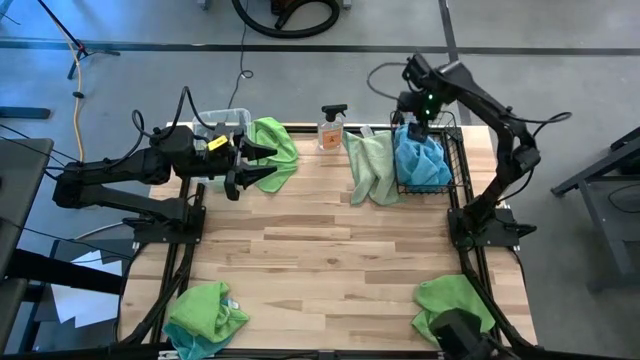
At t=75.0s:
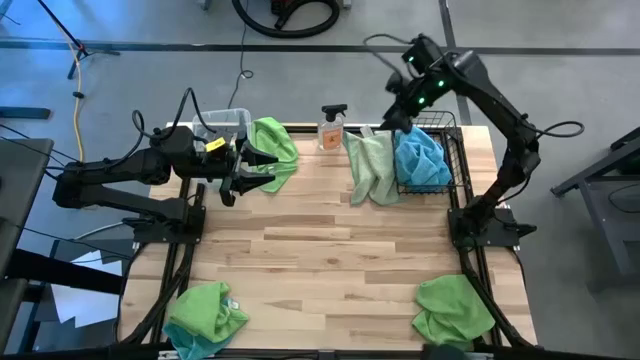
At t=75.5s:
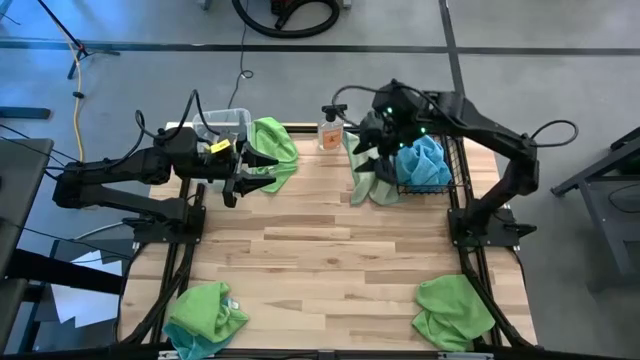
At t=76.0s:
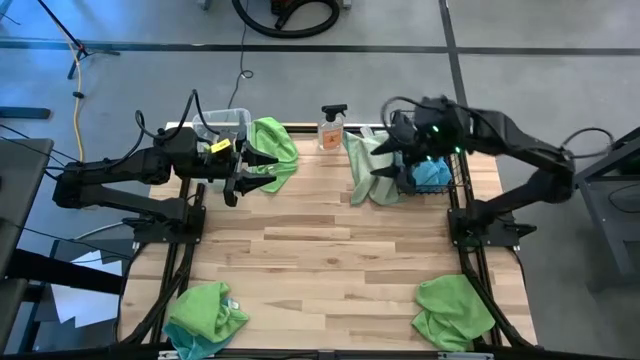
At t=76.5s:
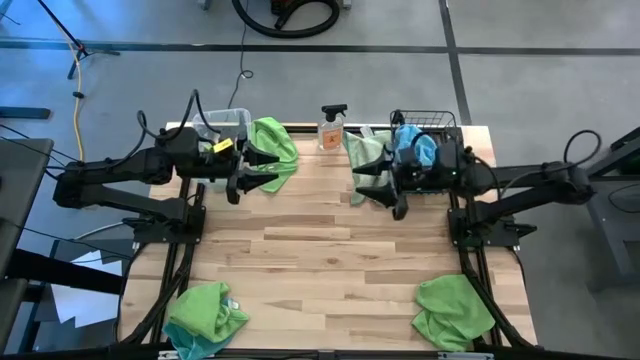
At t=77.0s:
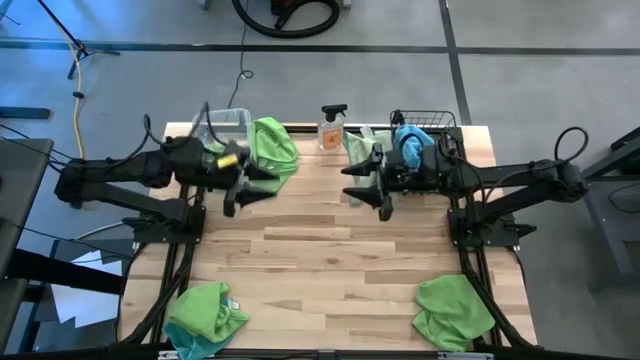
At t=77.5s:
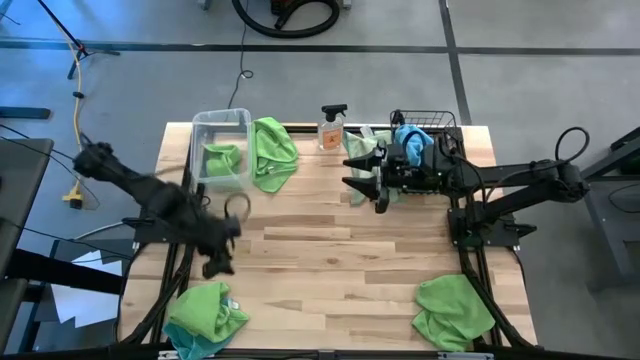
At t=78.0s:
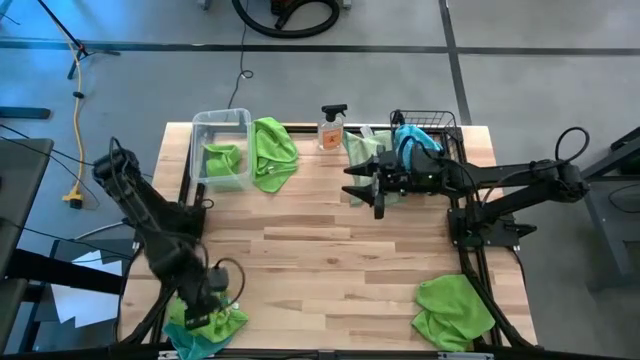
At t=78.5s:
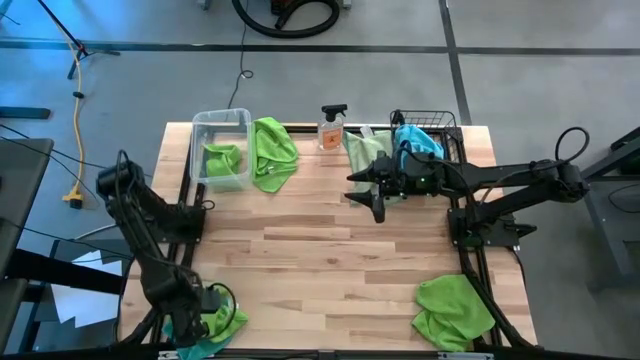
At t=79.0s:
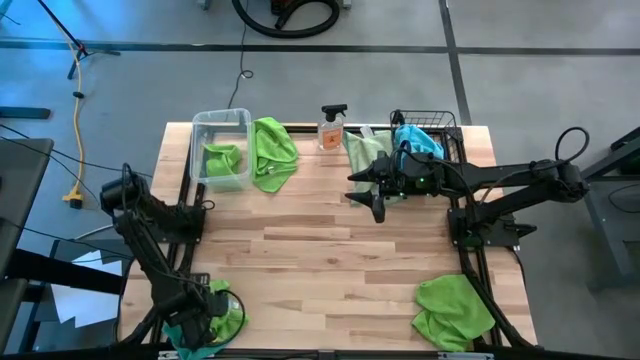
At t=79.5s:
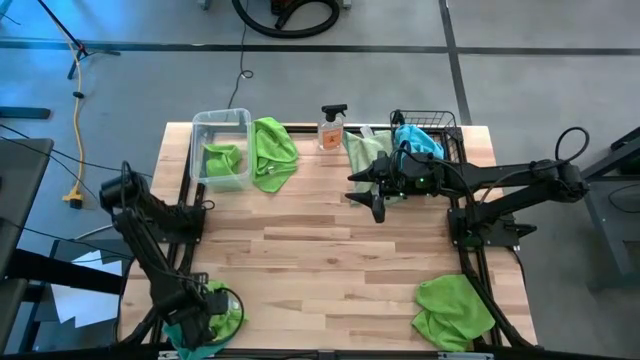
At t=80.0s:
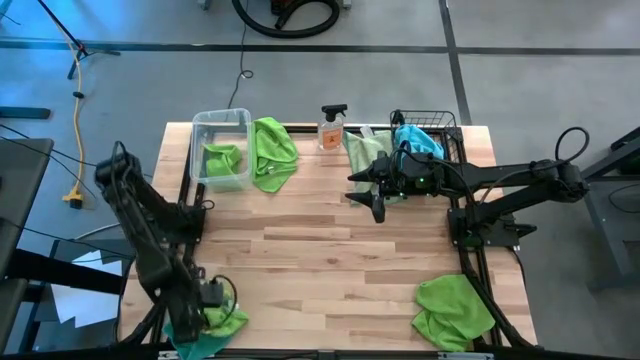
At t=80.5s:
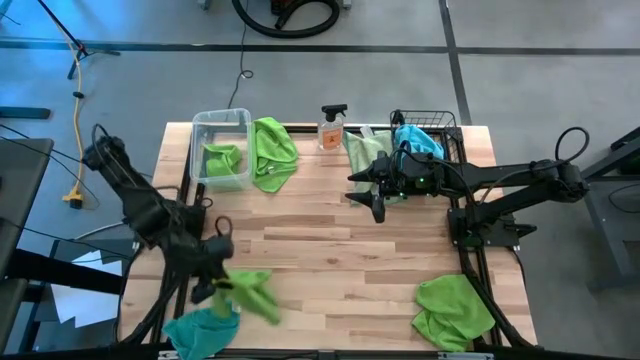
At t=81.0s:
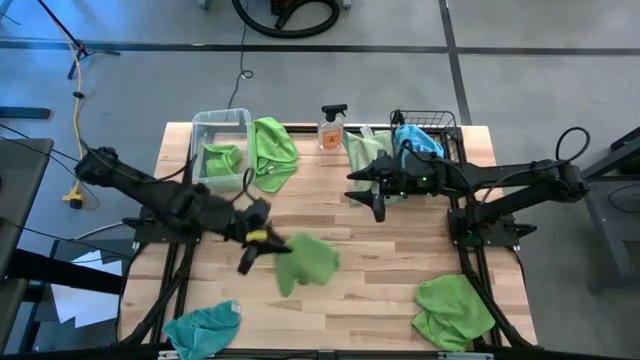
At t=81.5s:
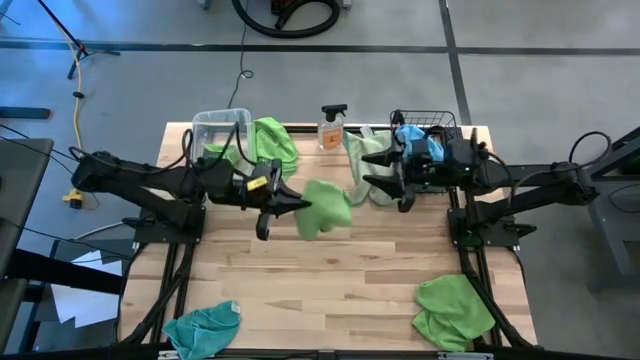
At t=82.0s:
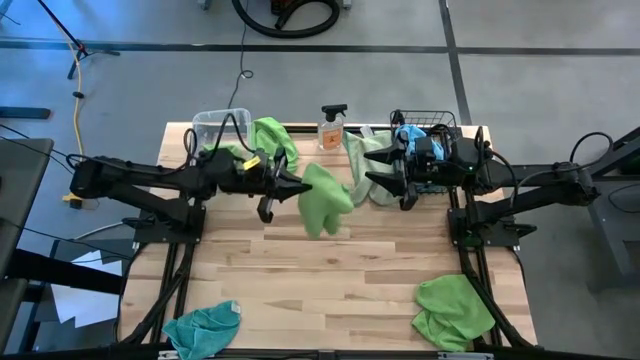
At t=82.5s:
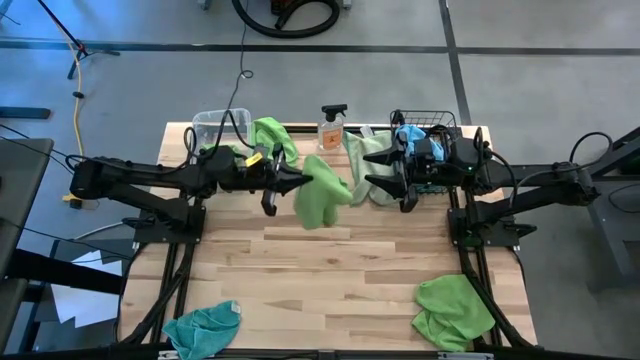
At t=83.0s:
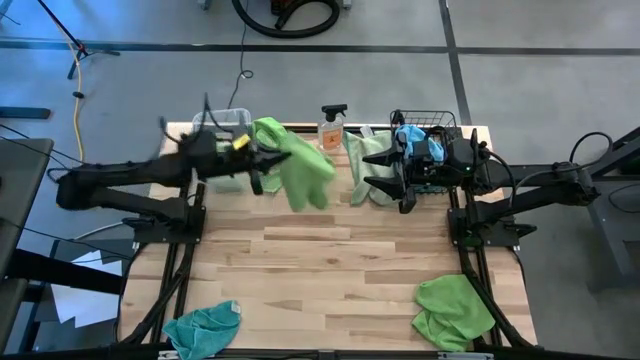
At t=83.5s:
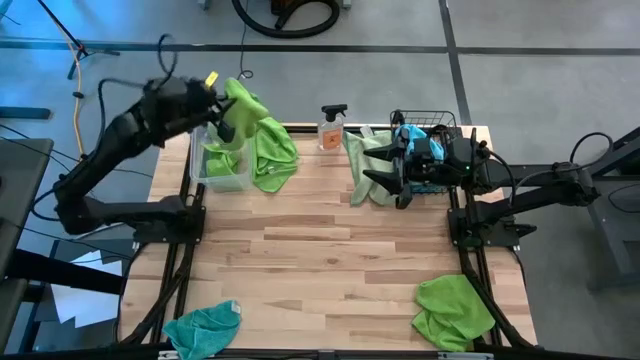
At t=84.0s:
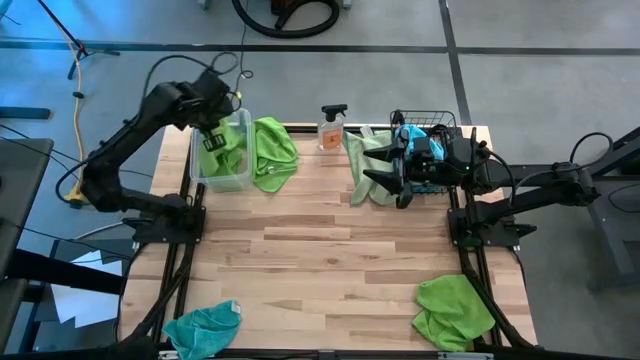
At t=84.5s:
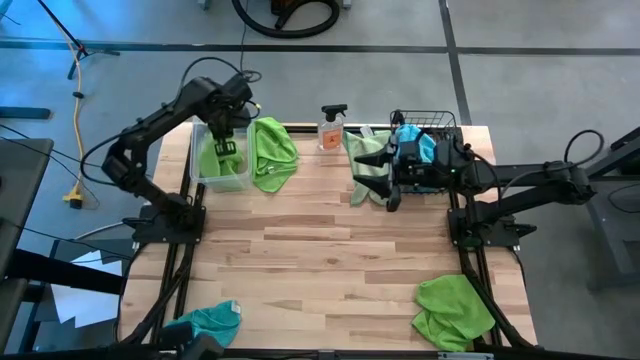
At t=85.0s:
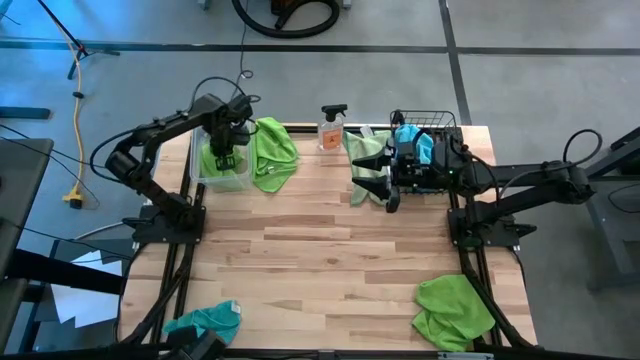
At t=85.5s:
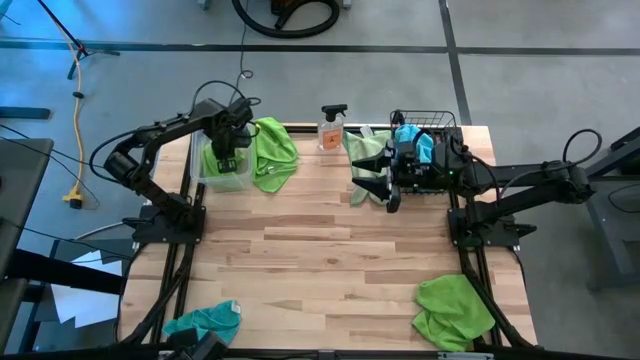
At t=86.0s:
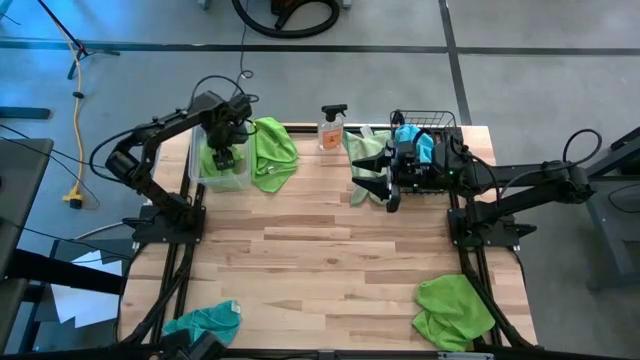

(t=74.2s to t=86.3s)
Task: Sort microfiber towel by color & place in baskets
Put the green microfiber cloth into the bin

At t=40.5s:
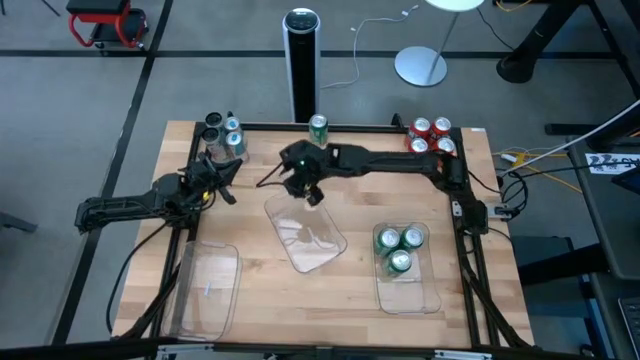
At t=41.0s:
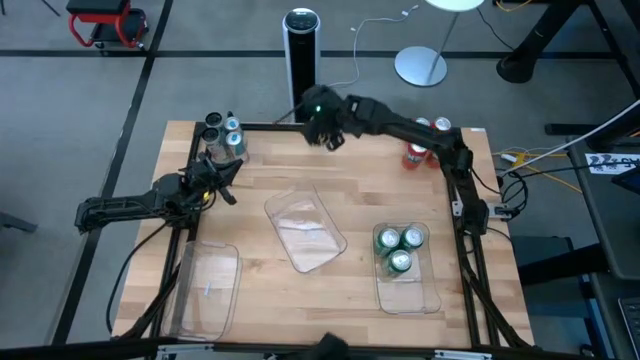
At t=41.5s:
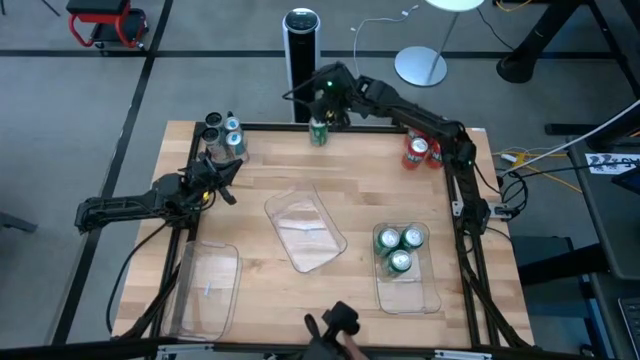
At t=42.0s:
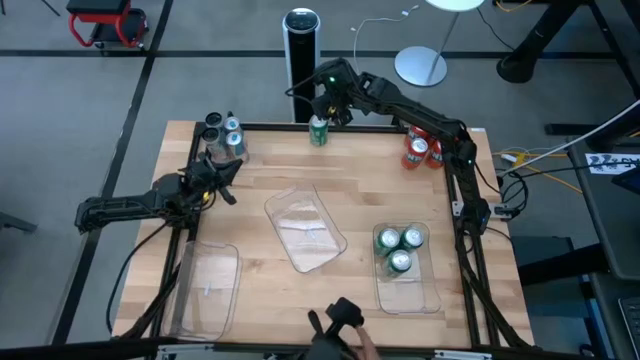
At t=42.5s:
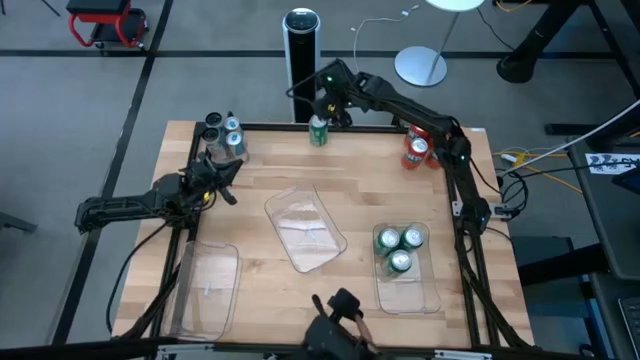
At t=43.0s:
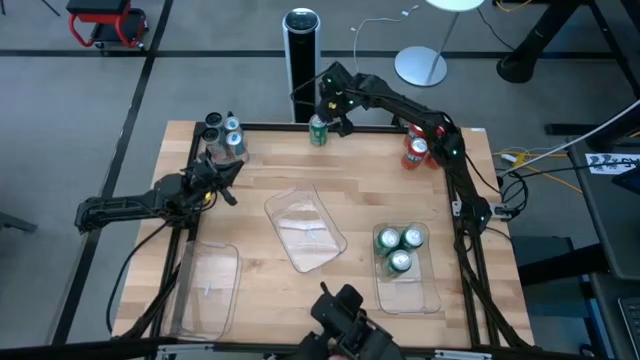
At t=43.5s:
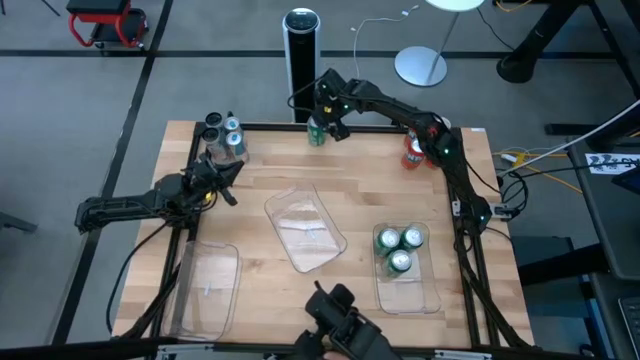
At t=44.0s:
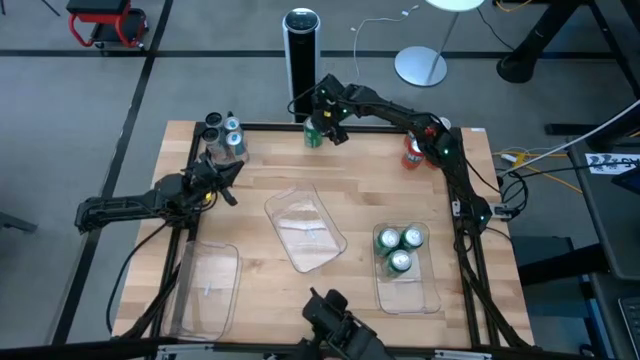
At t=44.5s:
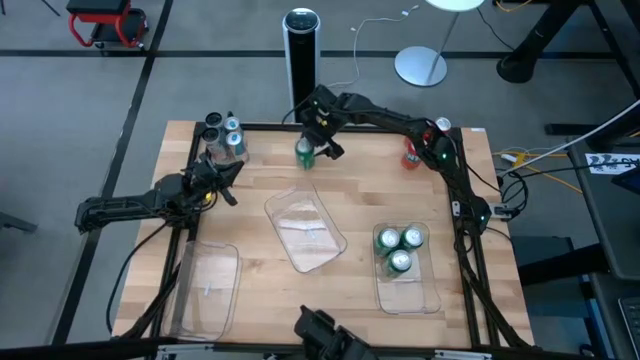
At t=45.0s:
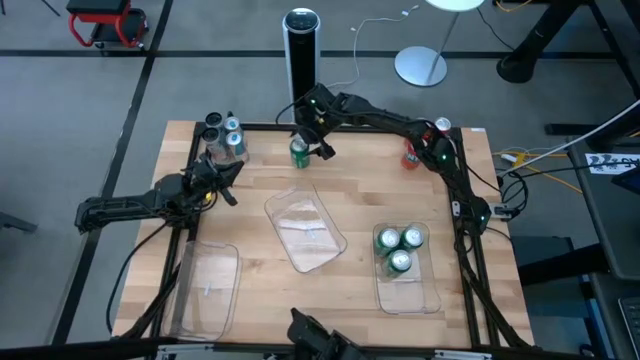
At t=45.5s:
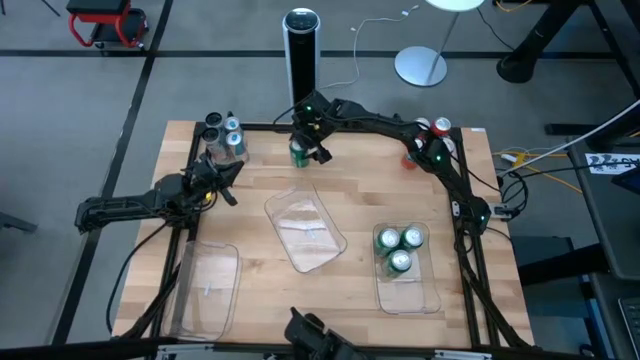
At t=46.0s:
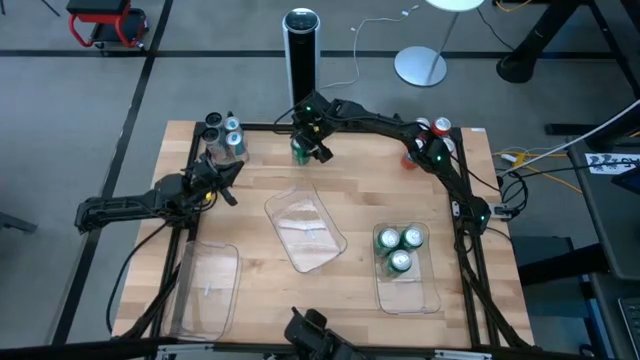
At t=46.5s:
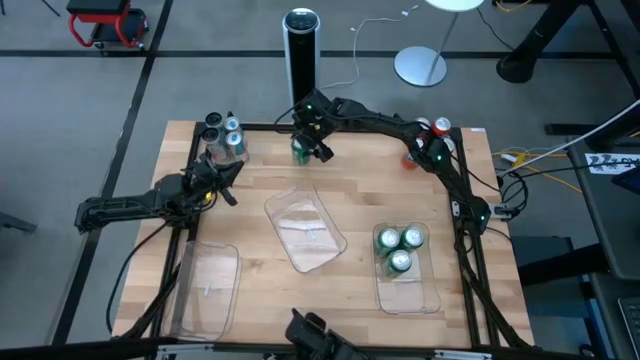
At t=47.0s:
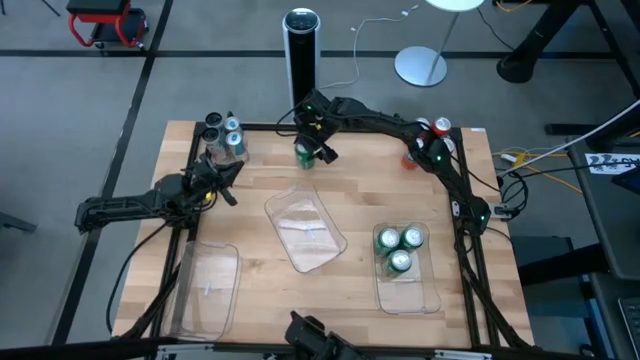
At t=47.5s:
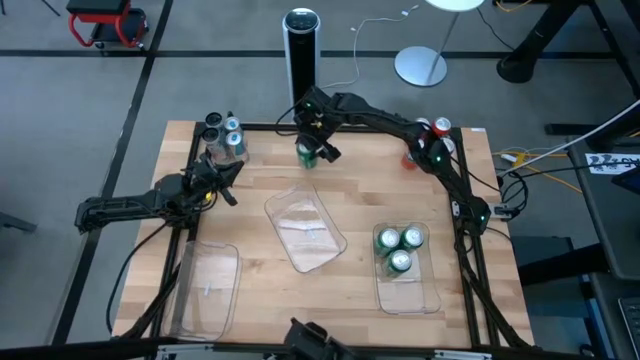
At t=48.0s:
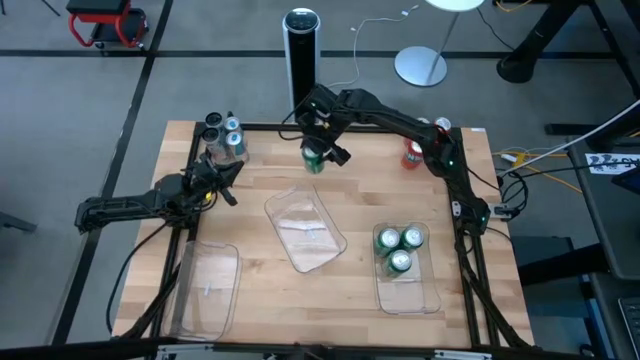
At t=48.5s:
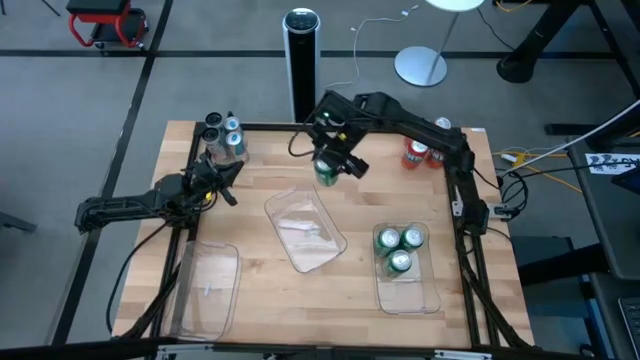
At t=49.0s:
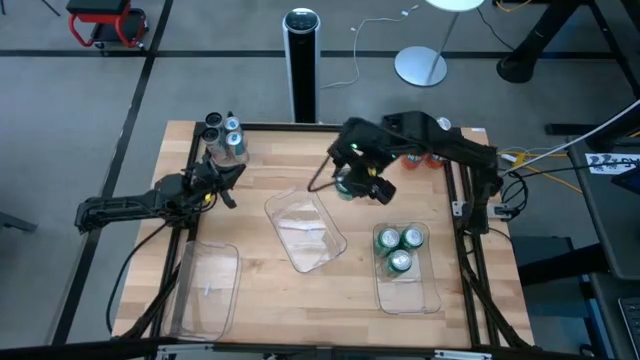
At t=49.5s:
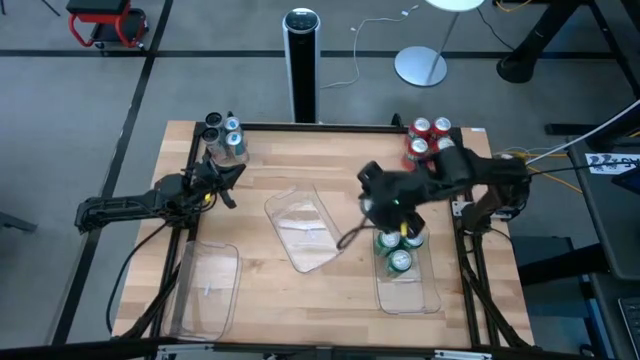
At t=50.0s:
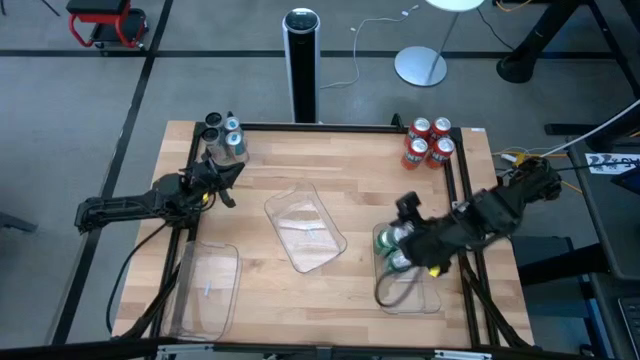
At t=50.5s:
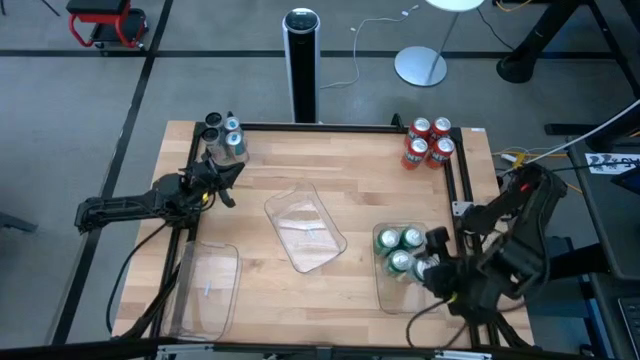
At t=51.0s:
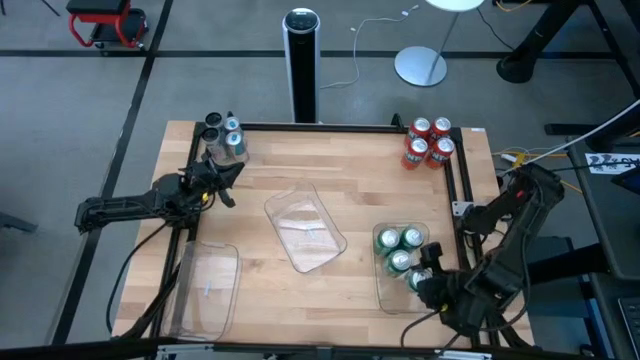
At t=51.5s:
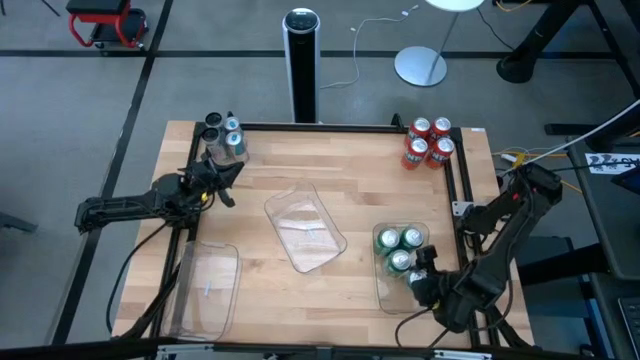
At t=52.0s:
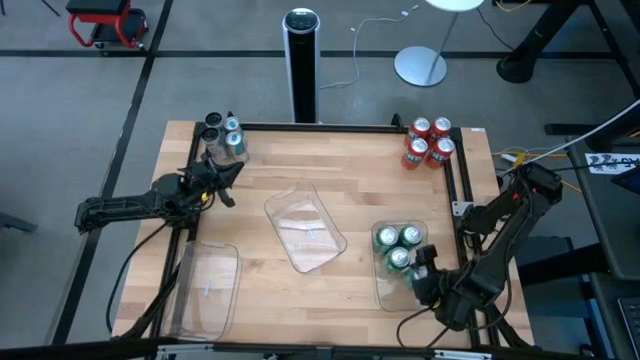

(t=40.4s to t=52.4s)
Task: Sort soda cans
Put the green soda can into the right transparent bin
